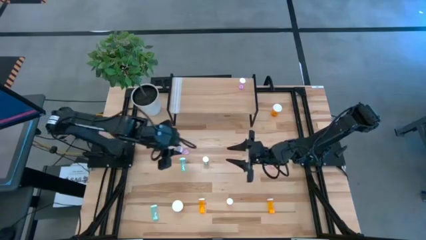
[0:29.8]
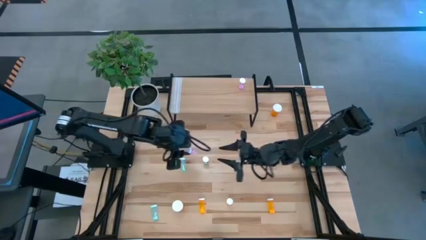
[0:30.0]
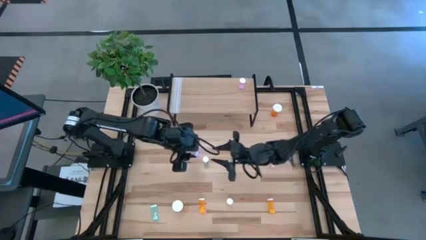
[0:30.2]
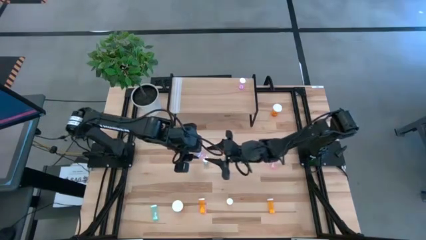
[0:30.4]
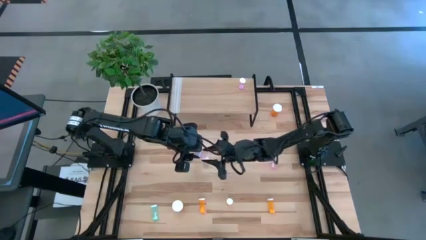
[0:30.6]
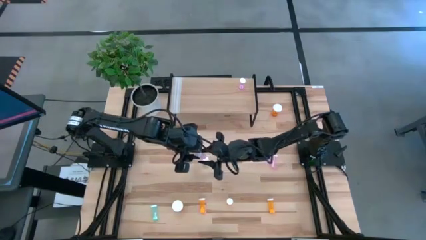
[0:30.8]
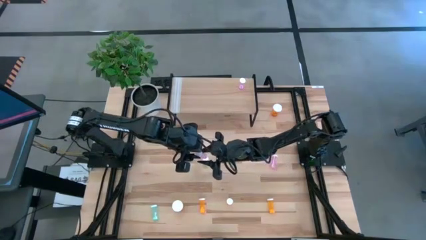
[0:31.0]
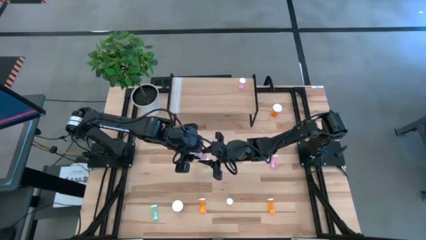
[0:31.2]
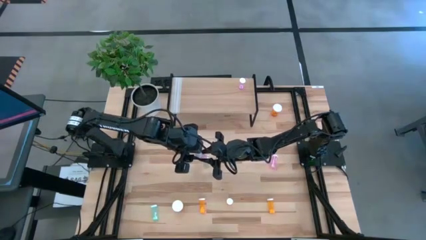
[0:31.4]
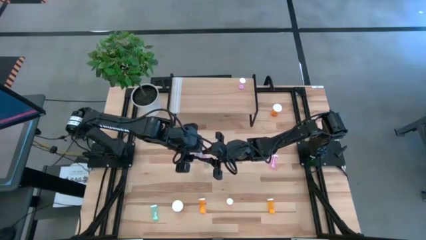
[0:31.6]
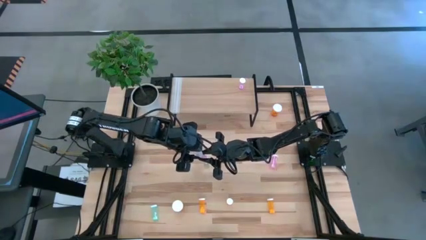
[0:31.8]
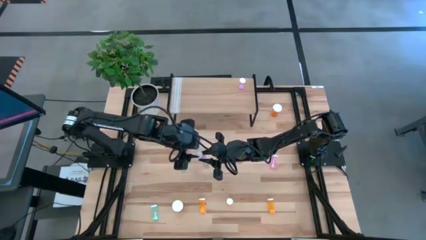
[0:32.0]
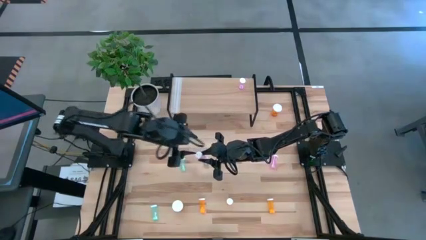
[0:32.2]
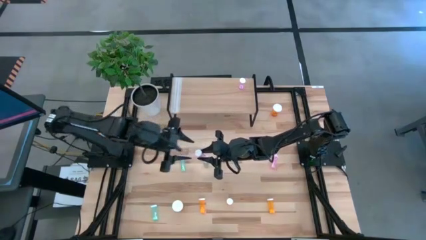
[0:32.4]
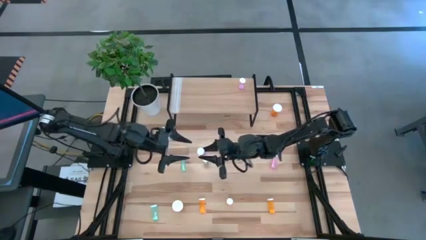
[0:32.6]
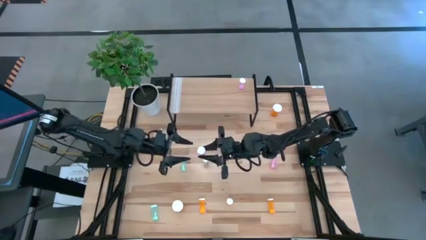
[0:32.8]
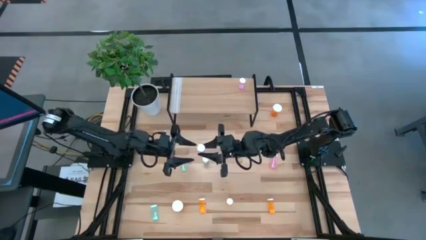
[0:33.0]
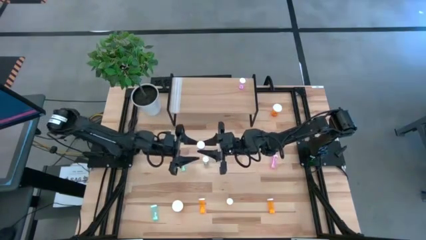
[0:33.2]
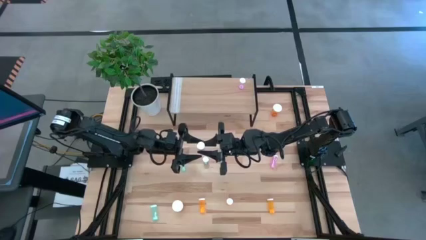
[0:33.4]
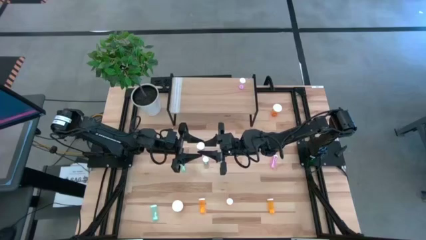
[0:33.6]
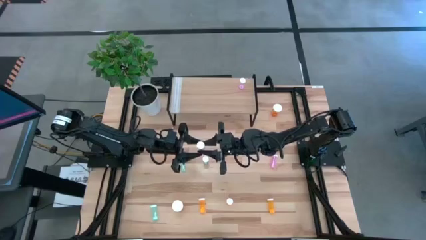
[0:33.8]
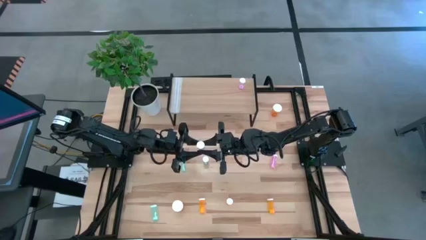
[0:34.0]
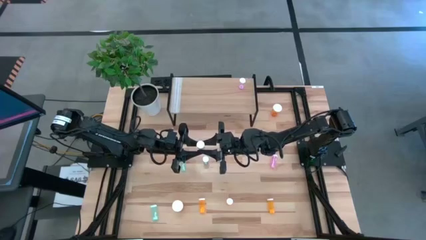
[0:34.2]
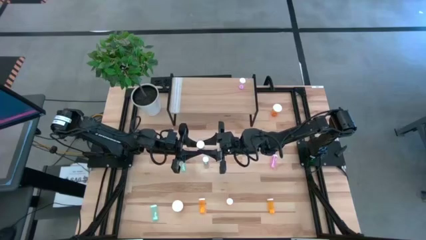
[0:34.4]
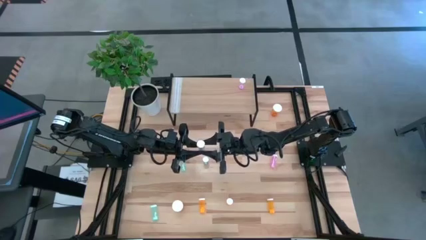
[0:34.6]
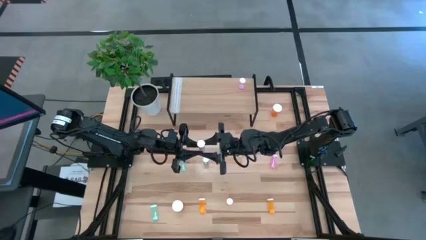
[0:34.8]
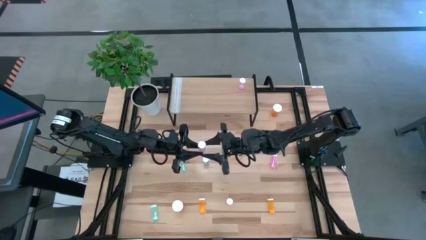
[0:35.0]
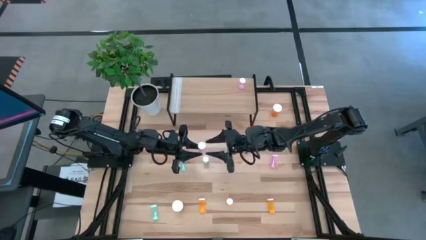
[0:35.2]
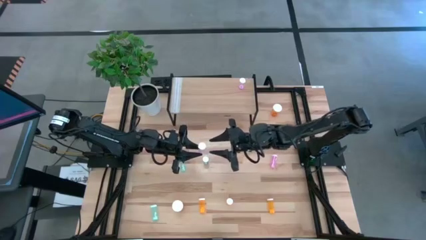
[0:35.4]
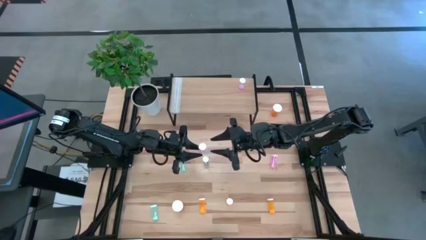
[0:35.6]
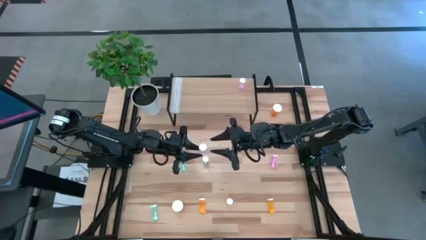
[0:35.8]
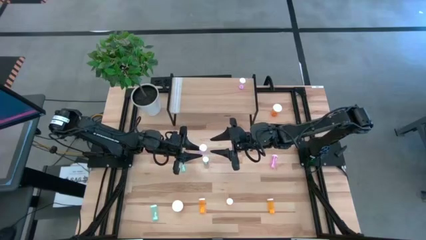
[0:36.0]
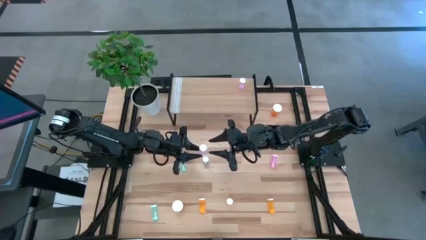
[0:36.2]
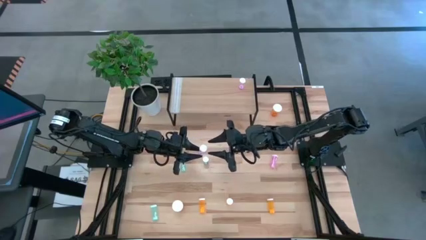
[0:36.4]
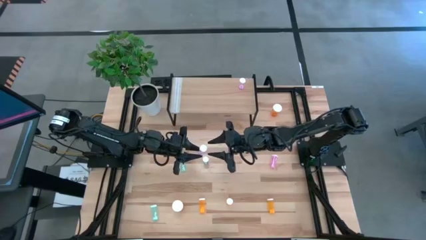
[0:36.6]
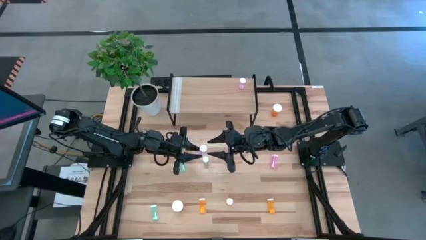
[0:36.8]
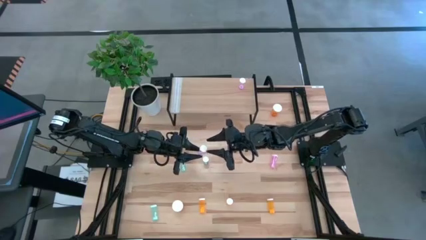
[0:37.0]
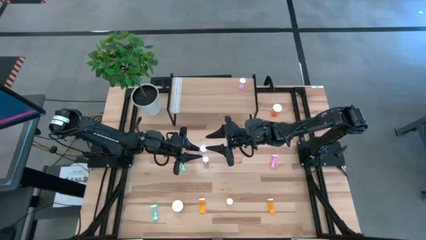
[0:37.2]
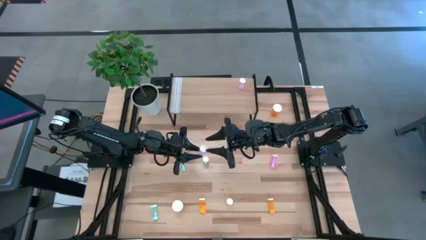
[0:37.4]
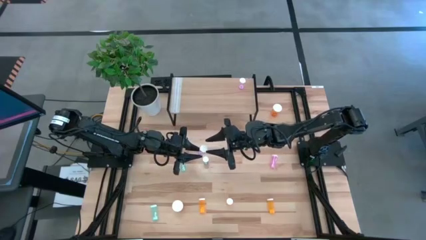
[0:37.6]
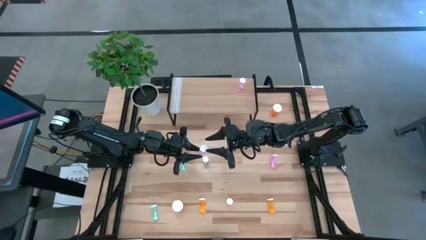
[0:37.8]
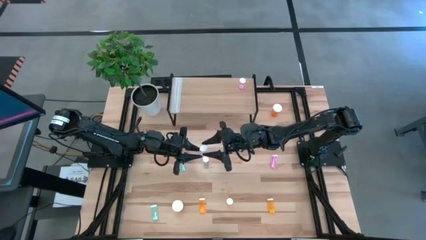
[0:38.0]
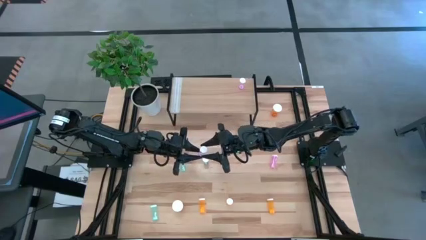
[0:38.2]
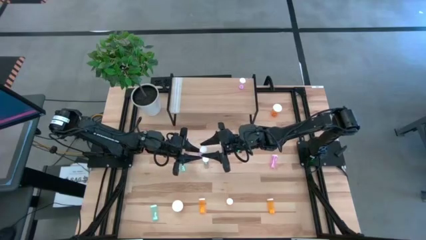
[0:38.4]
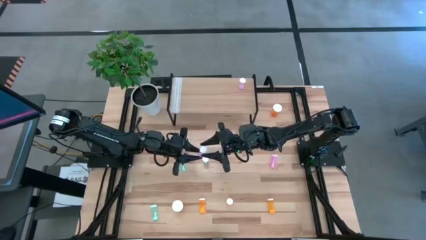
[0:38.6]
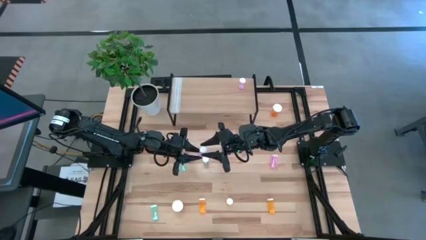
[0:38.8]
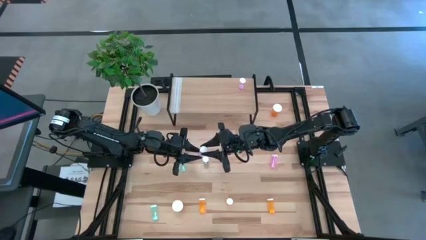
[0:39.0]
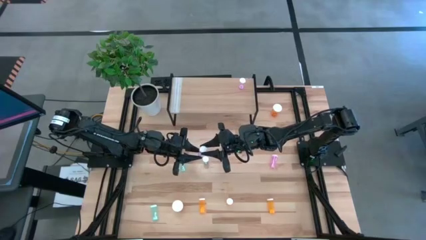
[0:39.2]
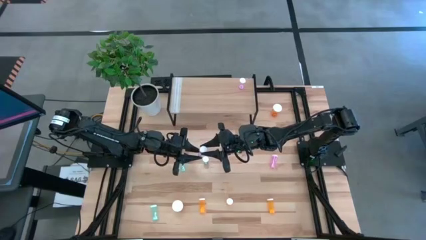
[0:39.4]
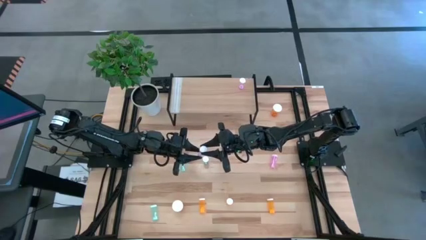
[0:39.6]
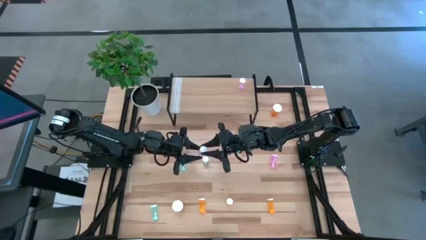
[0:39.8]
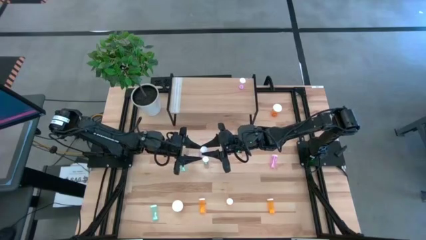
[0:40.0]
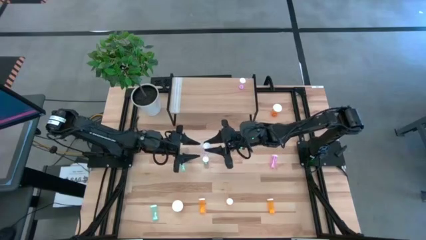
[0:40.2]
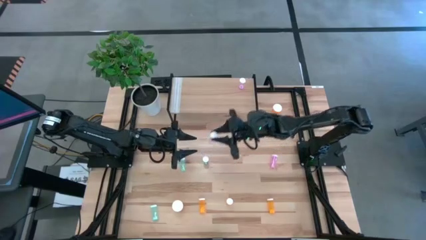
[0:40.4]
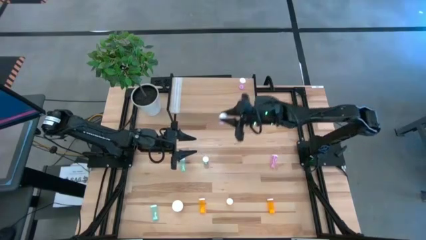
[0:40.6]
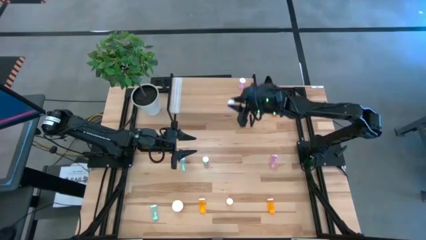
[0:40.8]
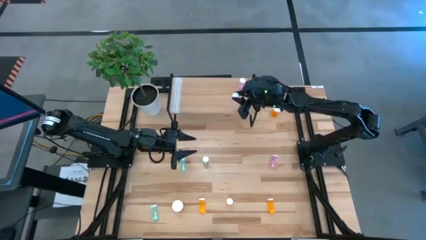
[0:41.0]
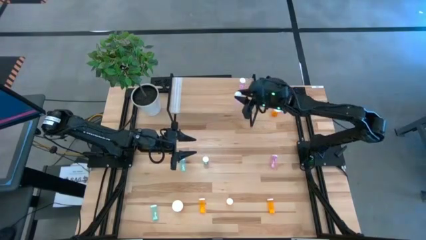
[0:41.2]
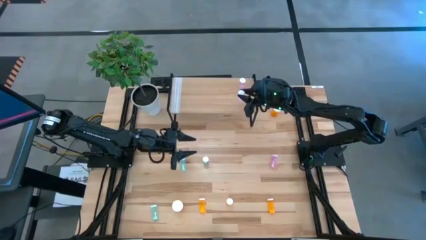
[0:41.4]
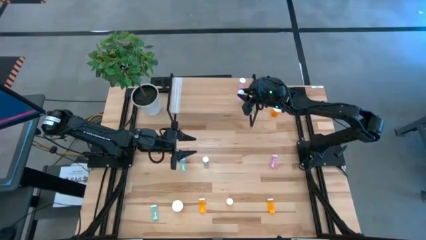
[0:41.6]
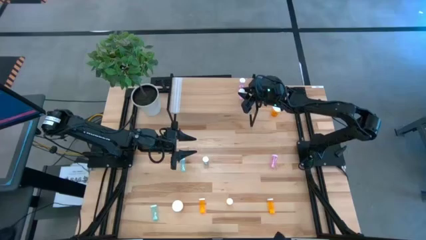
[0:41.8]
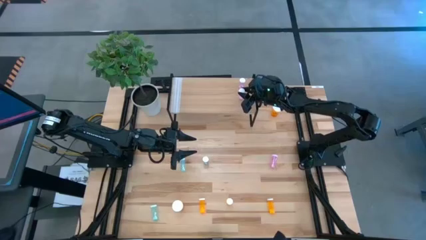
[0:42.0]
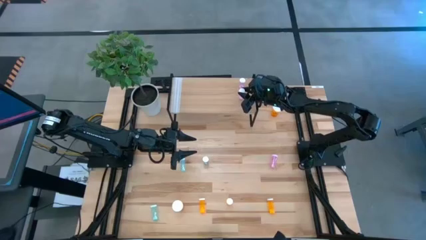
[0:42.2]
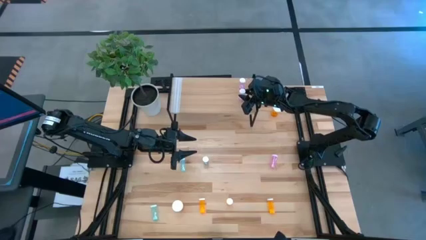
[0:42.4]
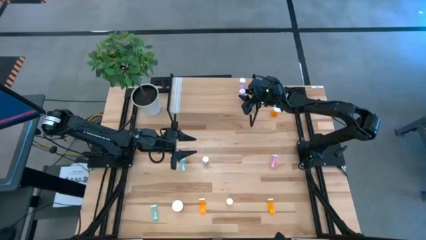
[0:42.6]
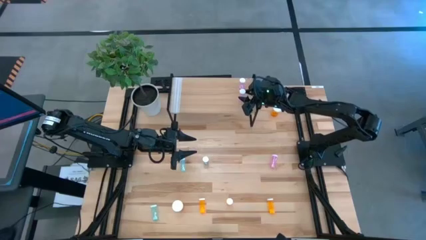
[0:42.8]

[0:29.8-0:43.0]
Task: Pick and place medicine bottles onto shelf by color
Put the left pink pill bottle on the shelf aligned with the other pink pill bottle

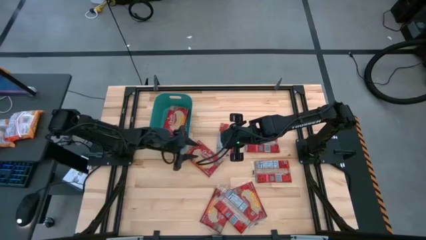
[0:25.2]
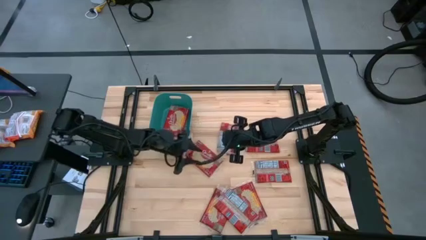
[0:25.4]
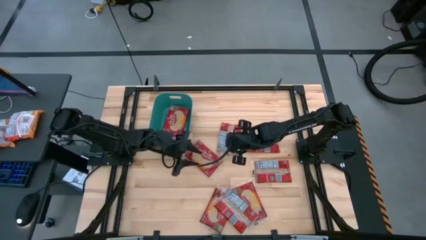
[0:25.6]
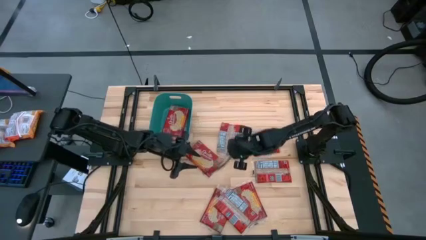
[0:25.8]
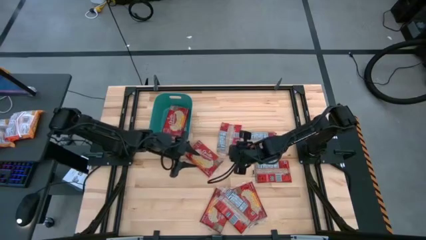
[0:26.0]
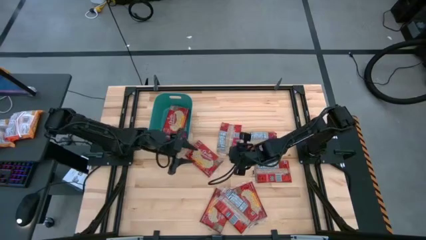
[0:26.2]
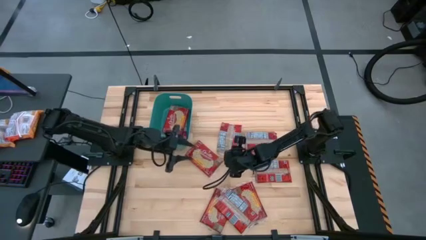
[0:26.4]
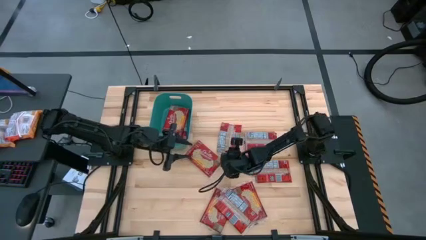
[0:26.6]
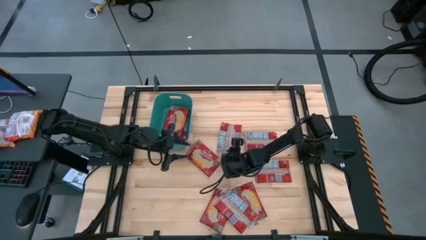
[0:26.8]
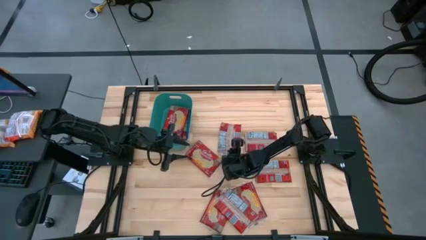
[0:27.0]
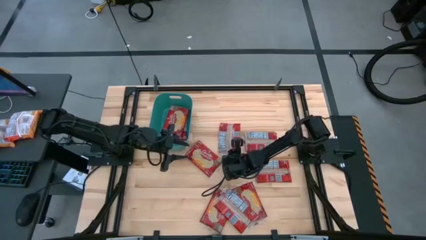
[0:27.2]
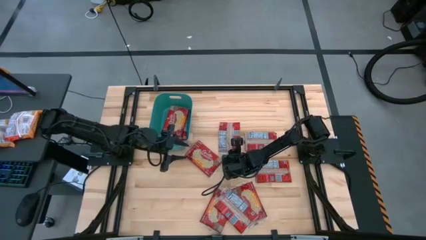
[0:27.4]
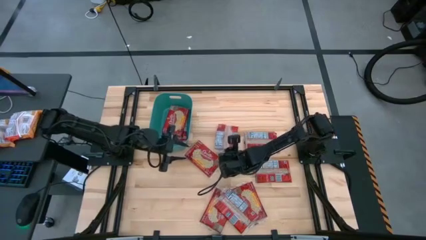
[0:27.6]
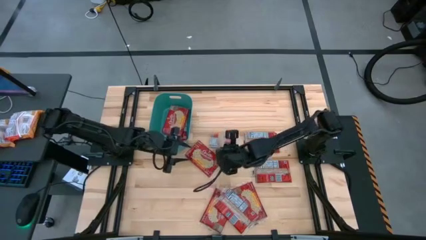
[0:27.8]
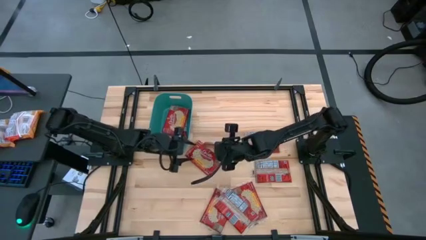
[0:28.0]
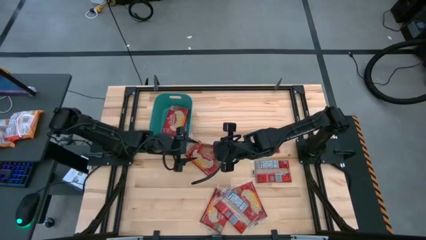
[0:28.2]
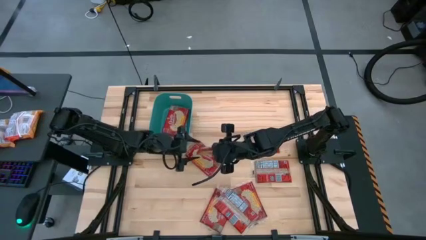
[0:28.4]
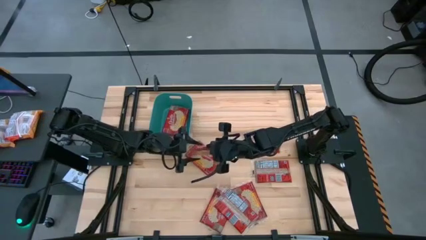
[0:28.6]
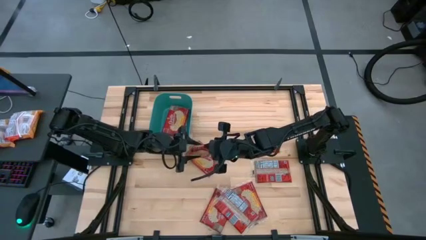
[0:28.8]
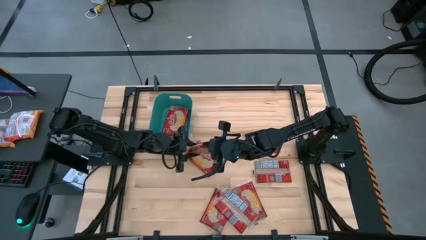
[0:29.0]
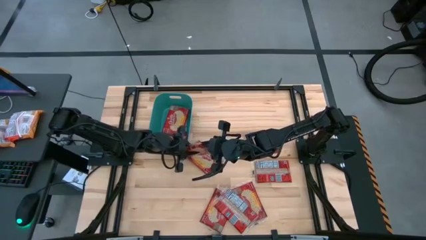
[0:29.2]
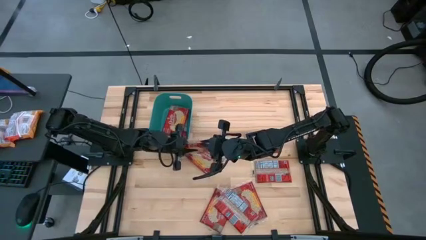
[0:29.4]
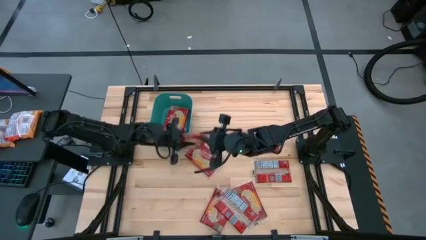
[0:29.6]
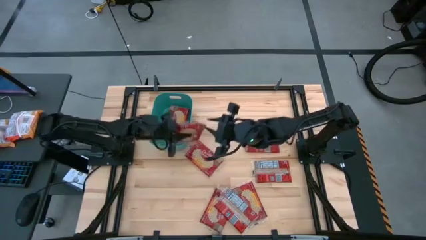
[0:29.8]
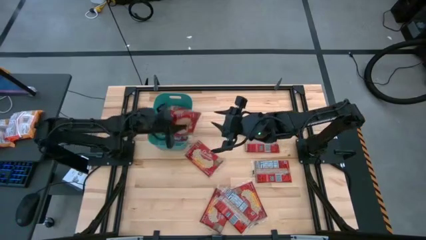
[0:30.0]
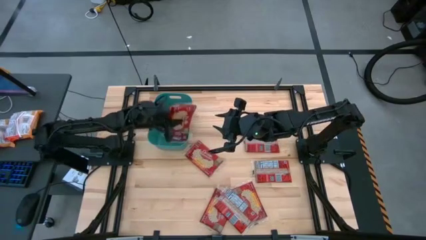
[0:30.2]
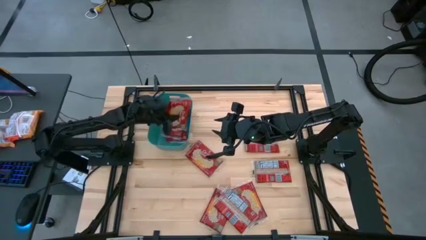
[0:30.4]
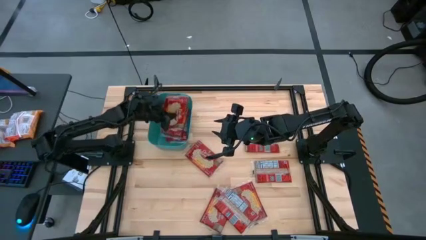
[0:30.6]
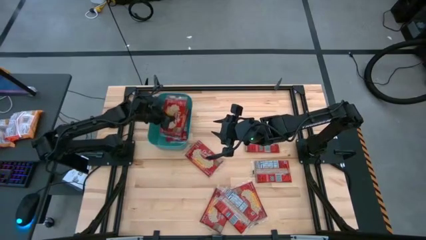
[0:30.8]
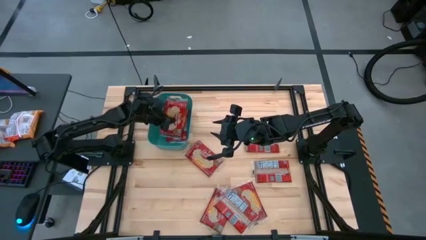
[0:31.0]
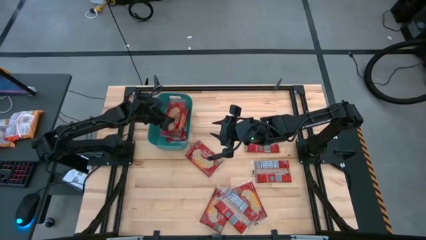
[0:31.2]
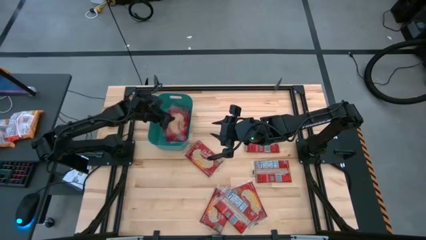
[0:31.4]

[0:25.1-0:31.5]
Task: Sort popcorn bags into baskets
Put the red popcorn bag into the green bin
